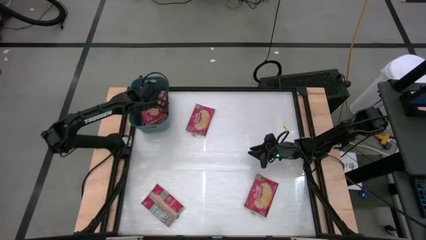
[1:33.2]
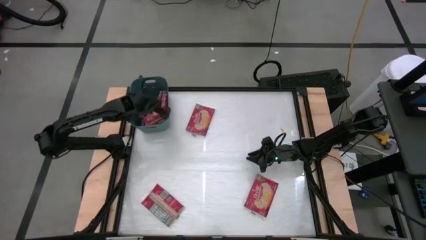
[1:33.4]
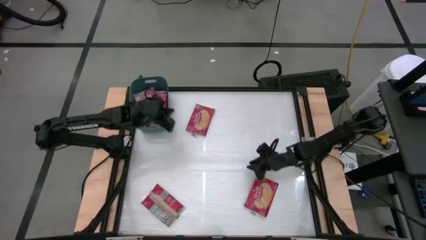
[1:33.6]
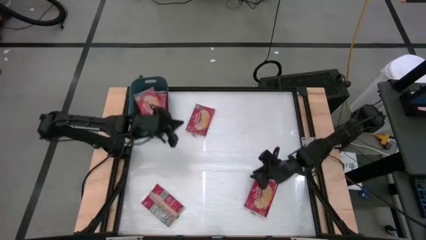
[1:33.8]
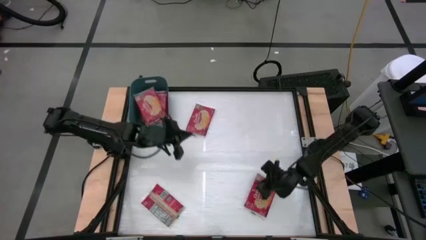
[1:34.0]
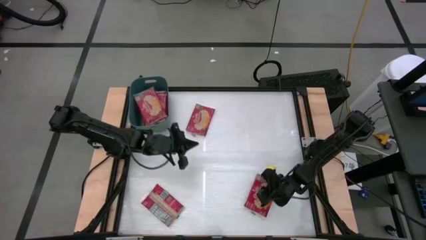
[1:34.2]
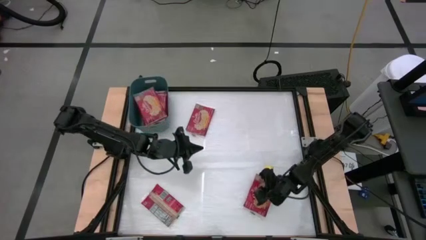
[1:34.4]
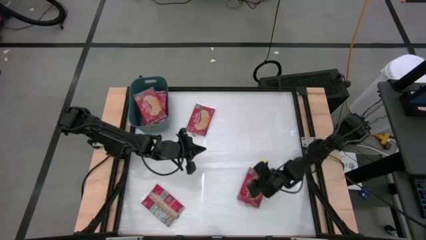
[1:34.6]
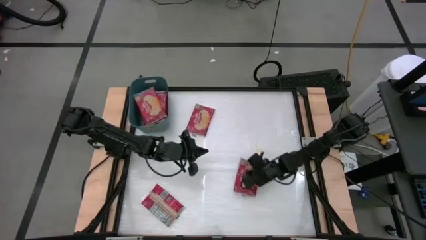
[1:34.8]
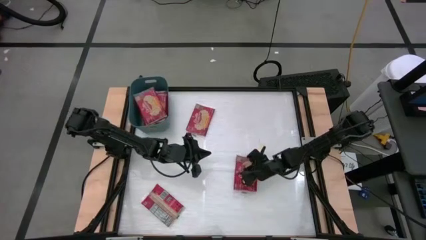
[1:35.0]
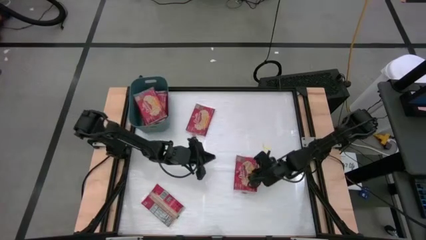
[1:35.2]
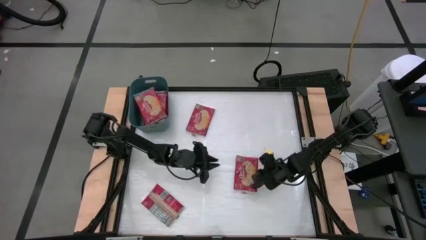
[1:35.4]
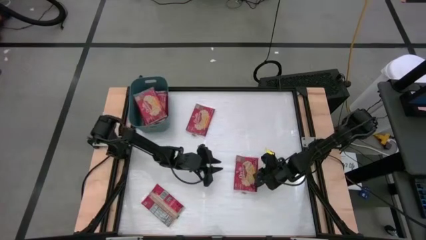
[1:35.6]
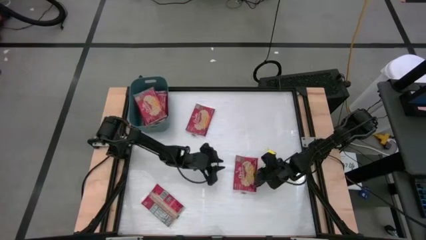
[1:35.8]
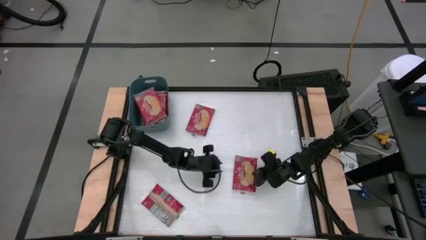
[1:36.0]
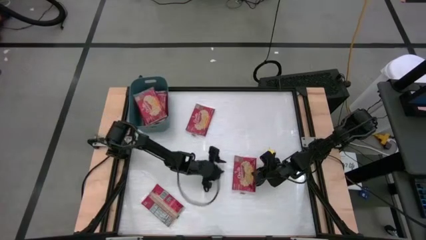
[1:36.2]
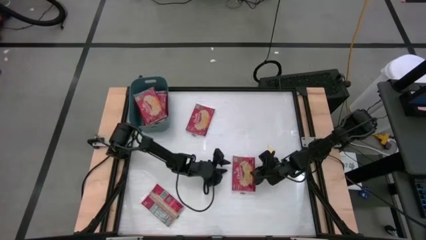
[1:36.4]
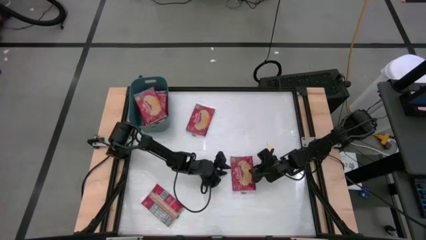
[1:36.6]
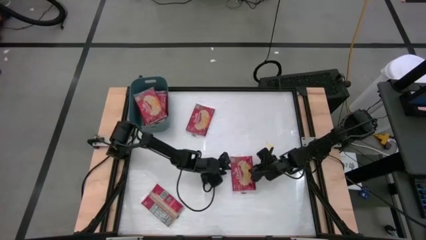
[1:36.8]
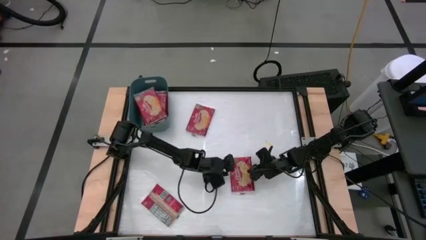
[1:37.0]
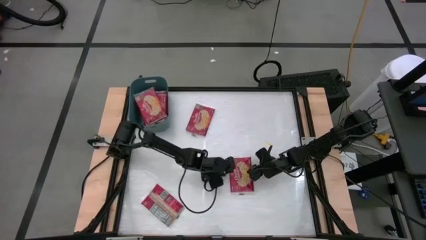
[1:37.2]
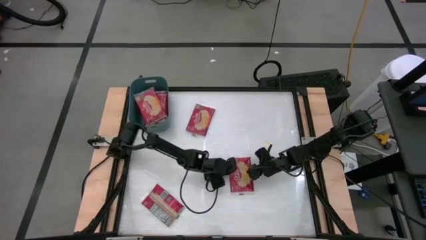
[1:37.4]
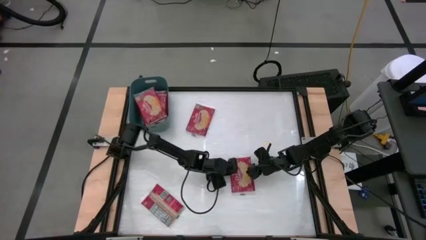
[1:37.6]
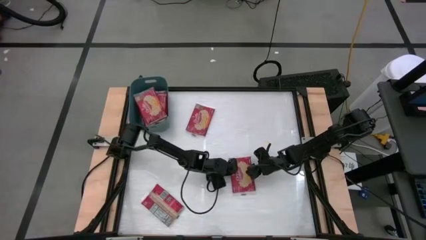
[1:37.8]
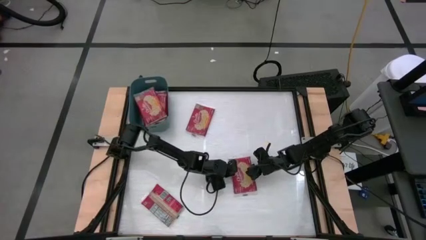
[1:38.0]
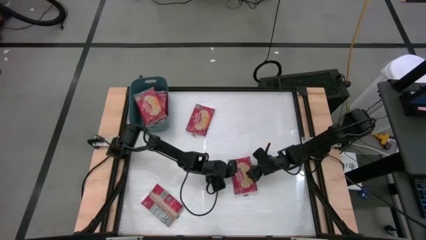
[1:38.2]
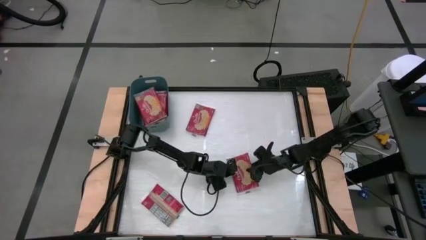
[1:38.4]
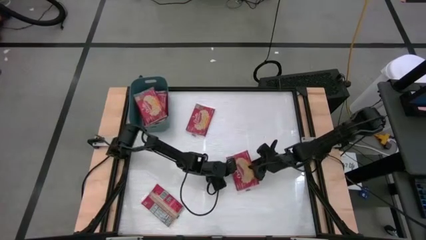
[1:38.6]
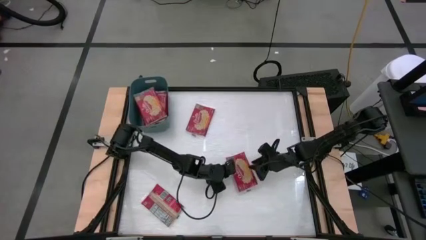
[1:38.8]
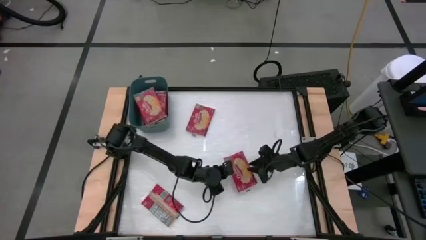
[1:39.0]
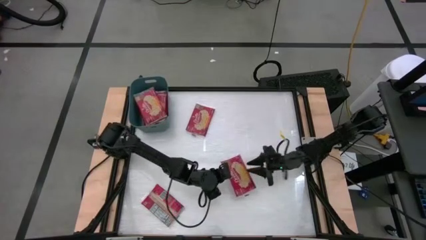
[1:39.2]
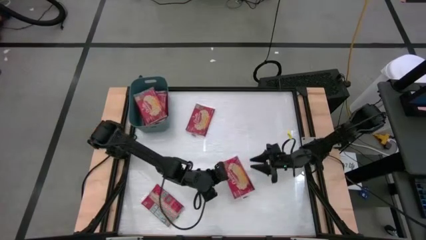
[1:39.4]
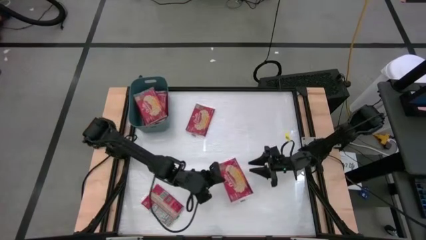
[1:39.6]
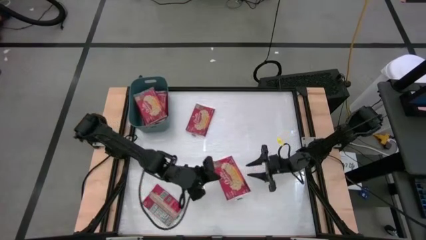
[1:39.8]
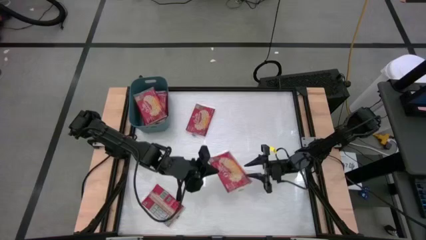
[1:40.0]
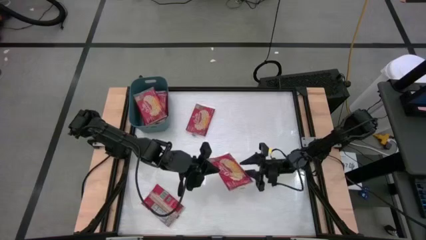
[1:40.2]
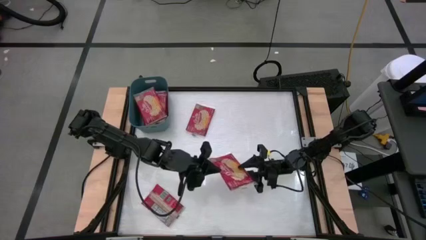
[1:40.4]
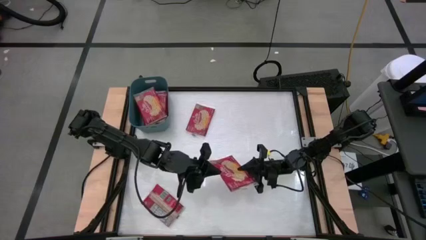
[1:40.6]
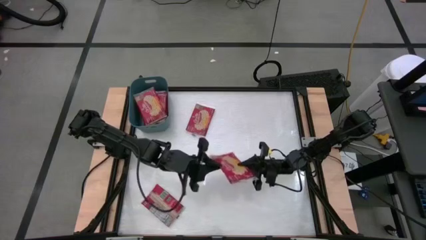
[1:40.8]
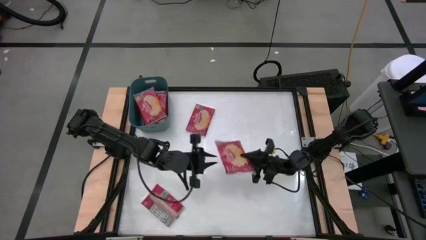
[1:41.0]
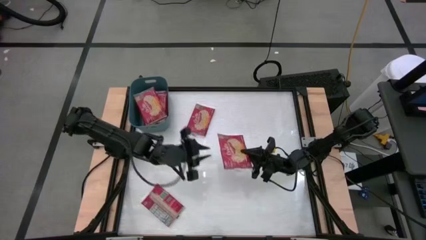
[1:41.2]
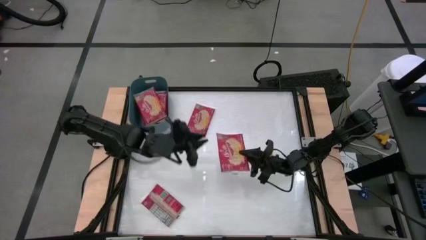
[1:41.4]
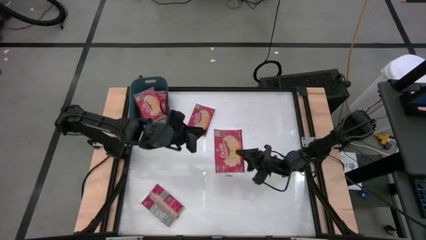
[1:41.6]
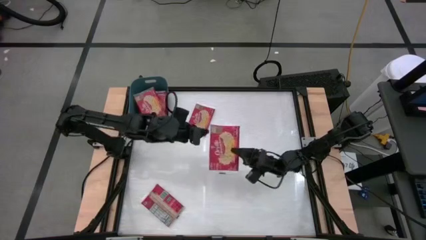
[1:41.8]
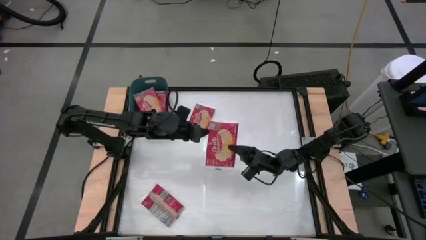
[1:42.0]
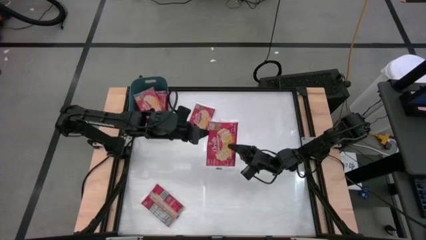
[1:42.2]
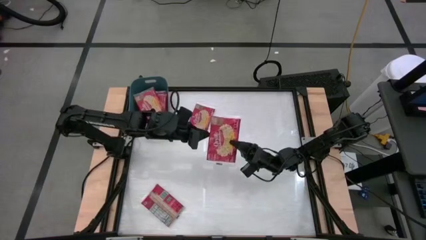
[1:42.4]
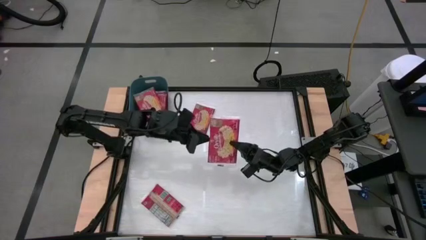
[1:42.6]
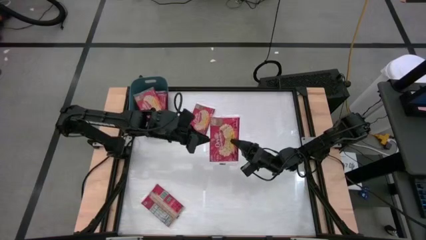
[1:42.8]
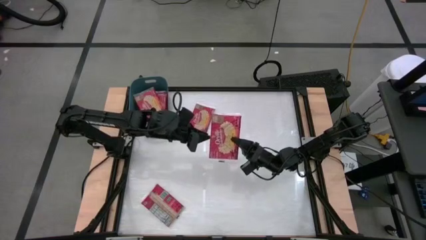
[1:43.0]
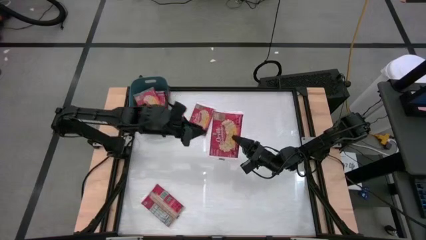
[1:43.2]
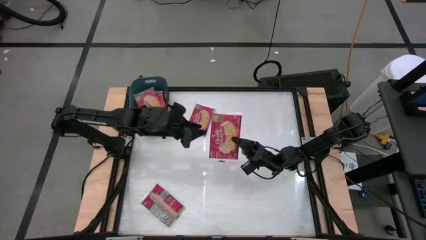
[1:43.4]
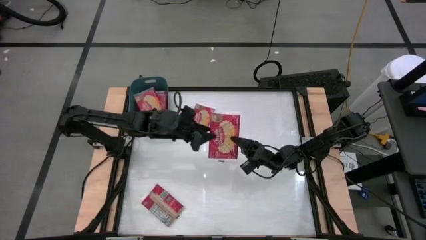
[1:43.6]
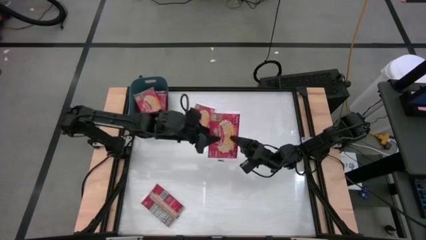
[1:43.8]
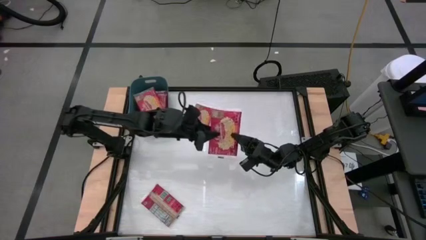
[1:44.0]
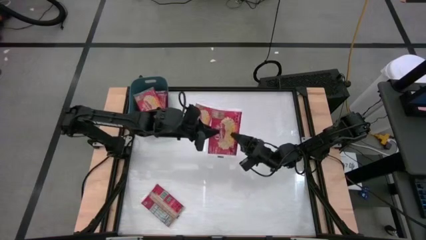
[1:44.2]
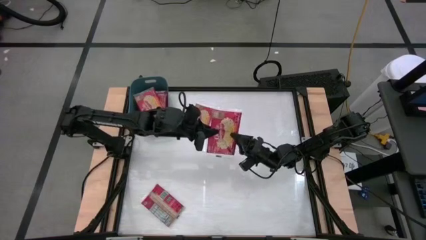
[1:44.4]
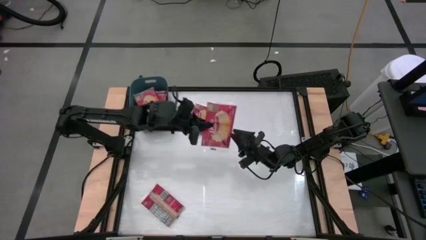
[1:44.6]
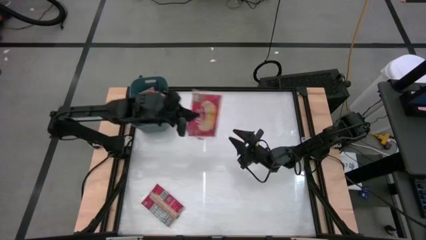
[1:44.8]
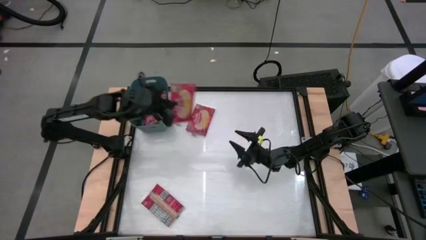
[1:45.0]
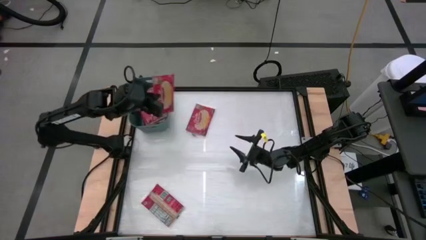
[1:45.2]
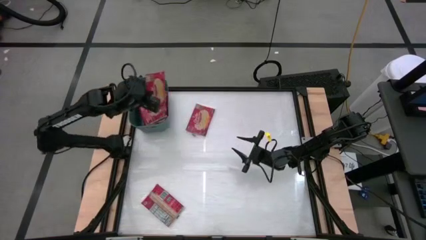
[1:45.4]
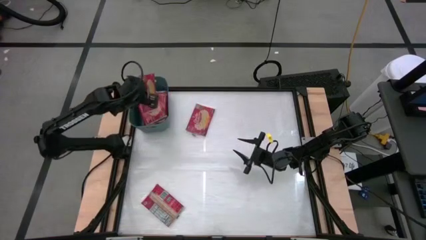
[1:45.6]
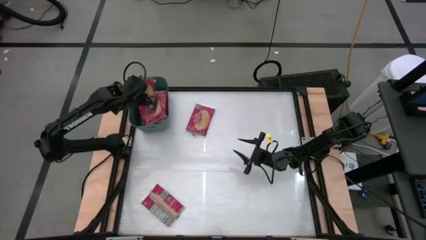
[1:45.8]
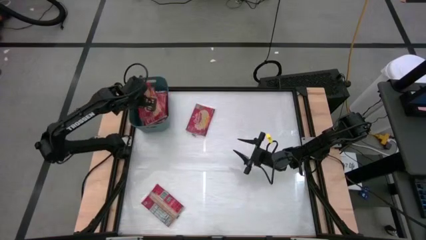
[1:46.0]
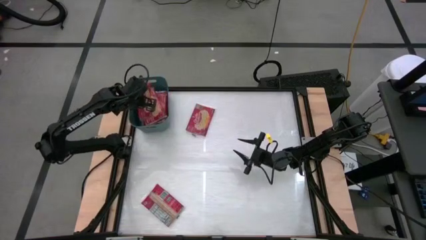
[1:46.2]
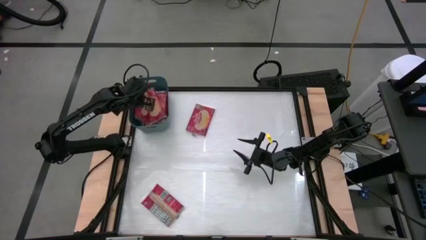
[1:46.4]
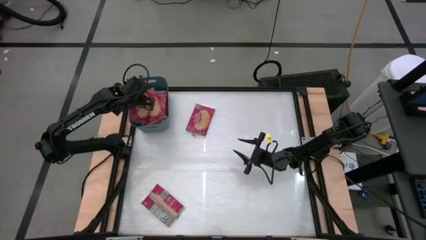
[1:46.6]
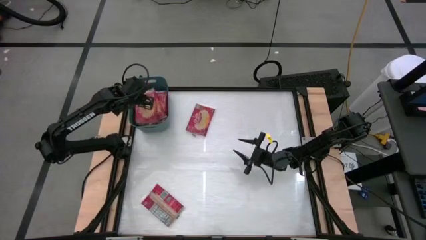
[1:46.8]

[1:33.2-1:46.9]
Task: Sort popcorn bags into baskets
Stack the red popcorn bag on top of the other red popcorn bag into the blue bin

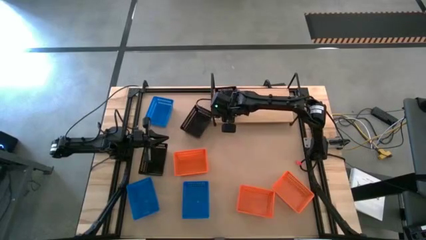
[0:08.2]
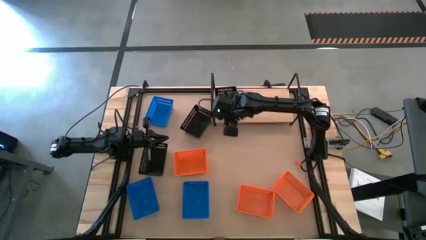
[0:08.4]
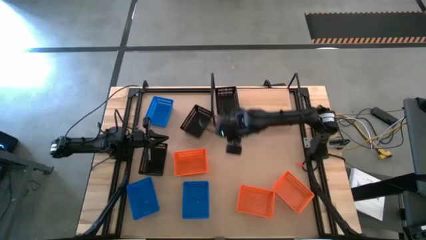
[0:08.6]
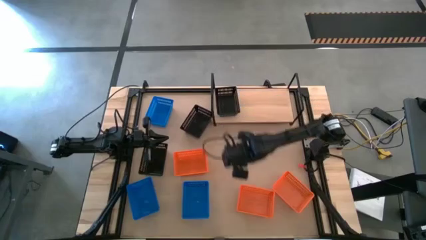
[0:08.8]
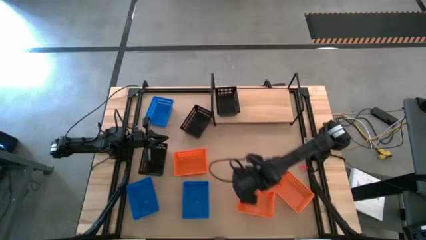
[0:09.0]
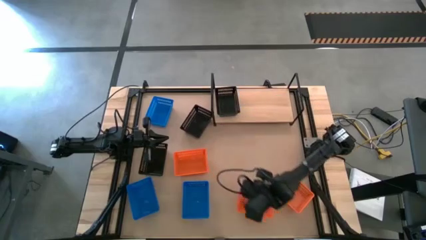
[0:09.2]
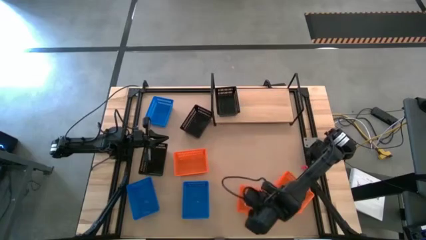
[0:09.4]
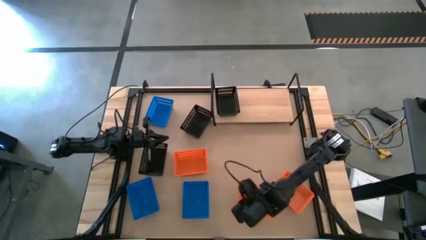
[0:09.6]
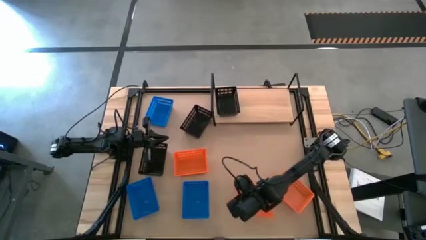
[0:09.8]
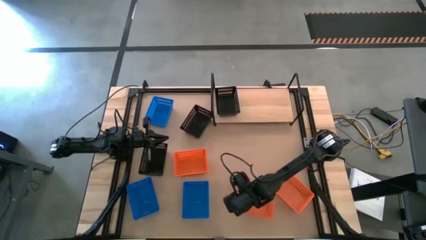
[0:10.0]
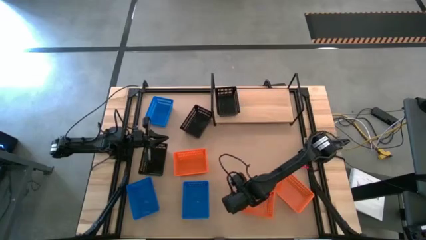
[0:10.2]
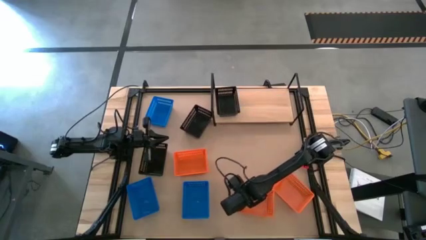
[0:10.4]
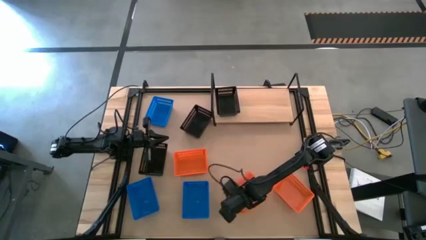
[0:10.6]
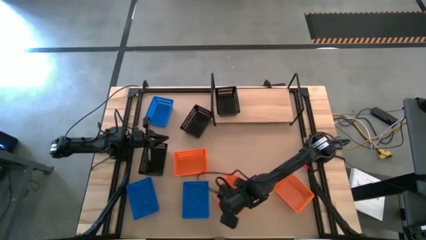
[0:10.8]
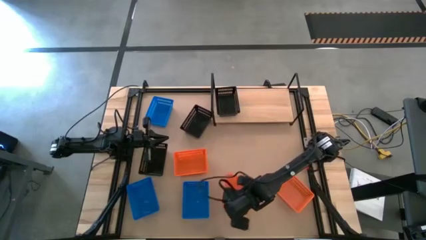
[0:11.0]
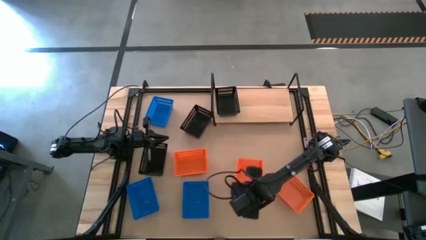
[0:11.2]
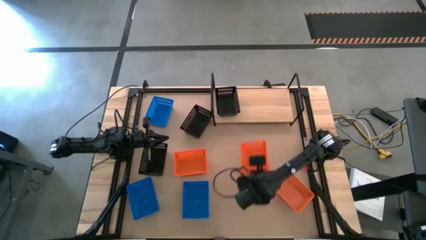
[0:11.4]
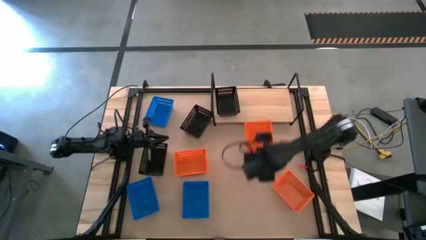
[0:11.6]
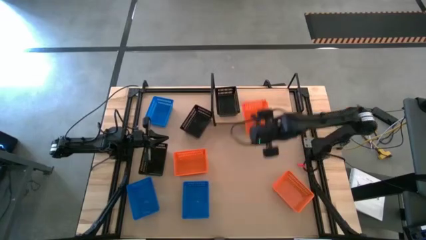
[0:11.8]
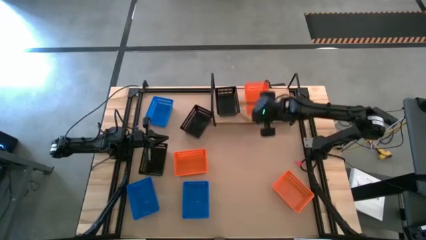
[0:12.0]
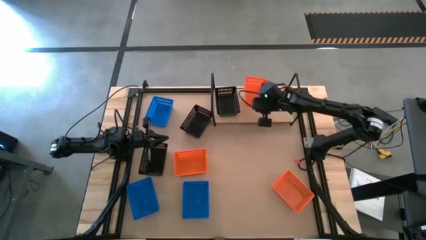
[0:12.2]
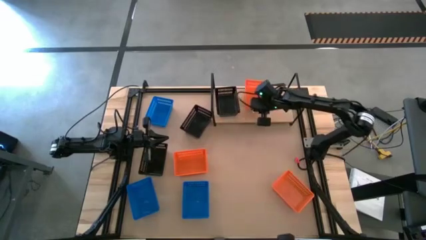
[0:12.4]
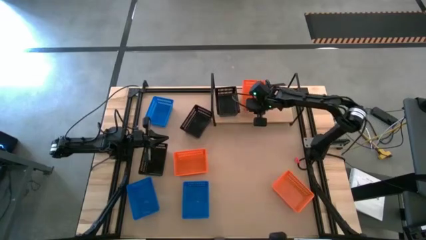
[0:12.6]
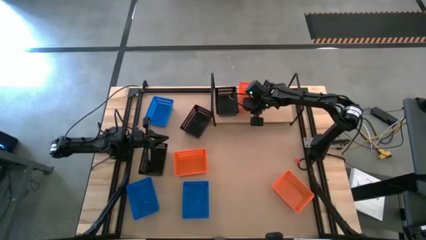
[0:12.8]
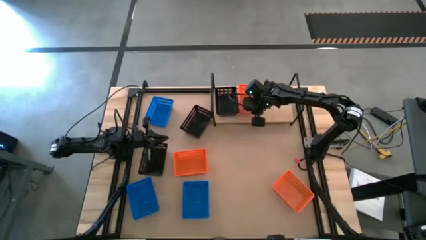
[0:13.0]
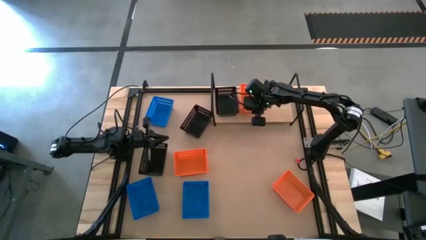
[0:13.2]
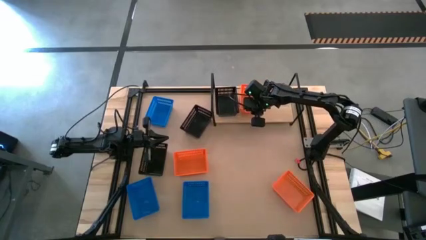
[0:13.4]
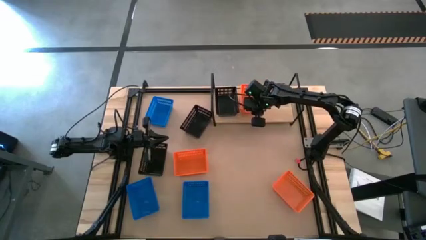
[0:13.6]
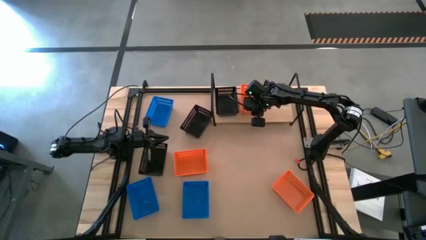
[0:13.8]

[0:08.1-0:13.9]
Task: Stack baskets on shelf by color
Put the bottom left orange bin on the shelf
